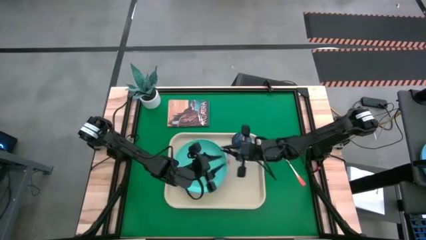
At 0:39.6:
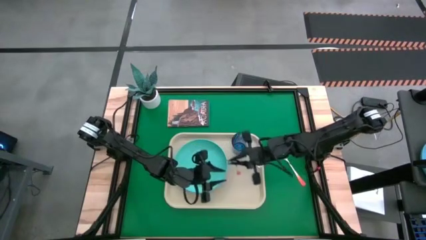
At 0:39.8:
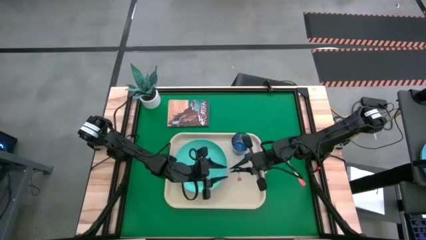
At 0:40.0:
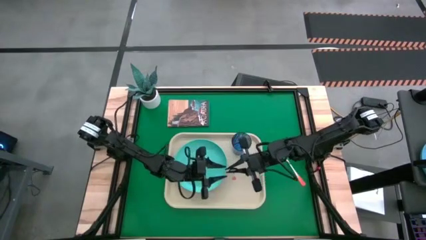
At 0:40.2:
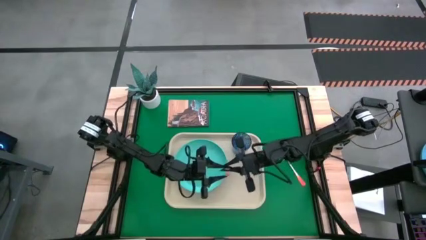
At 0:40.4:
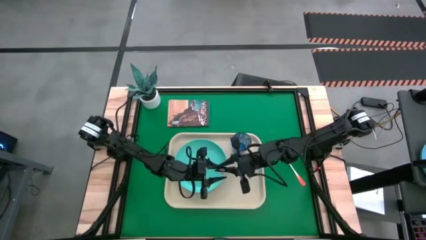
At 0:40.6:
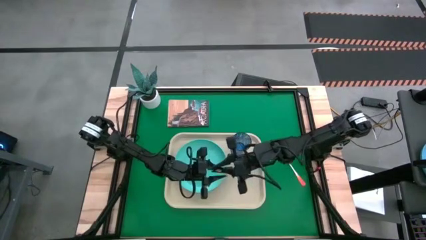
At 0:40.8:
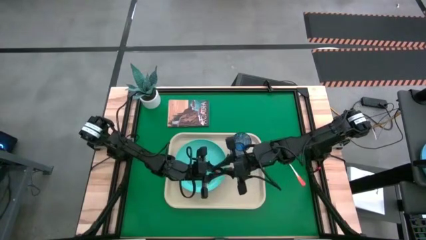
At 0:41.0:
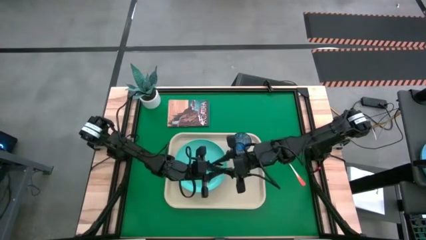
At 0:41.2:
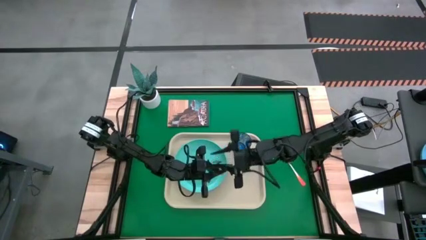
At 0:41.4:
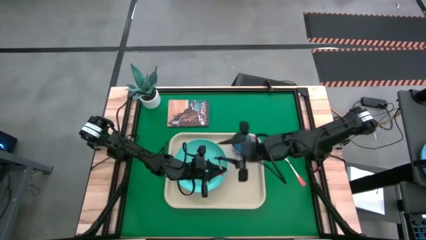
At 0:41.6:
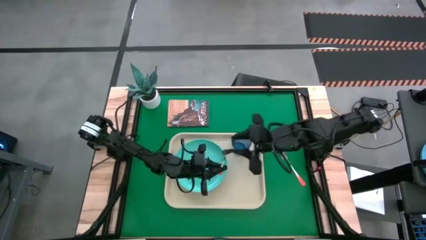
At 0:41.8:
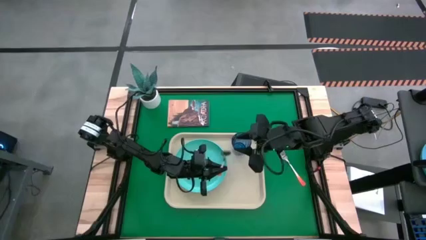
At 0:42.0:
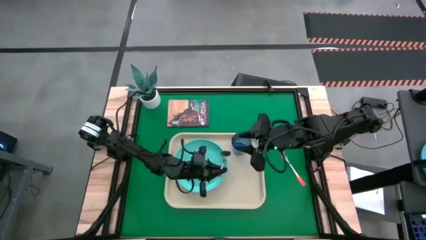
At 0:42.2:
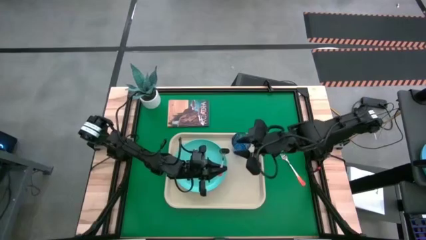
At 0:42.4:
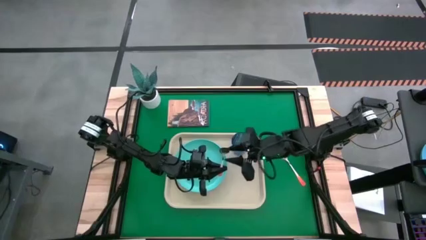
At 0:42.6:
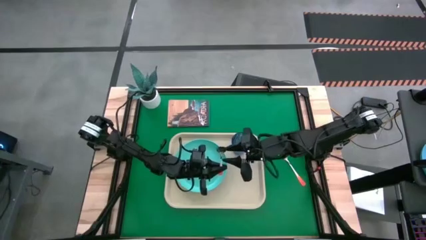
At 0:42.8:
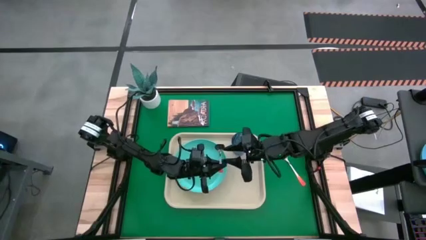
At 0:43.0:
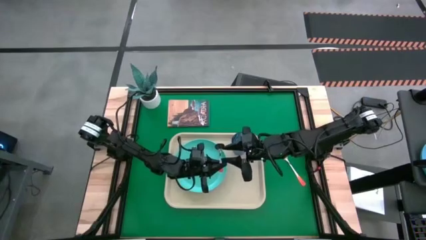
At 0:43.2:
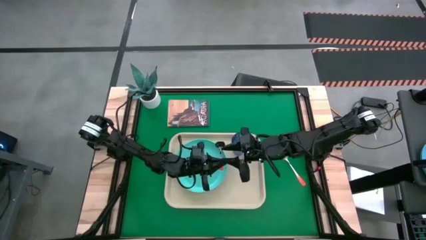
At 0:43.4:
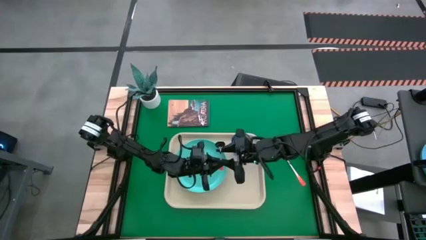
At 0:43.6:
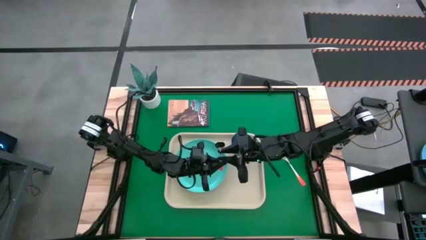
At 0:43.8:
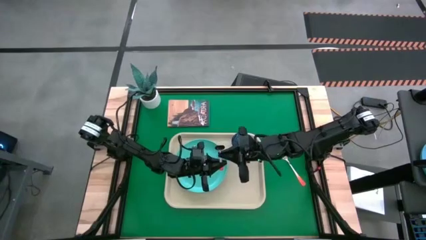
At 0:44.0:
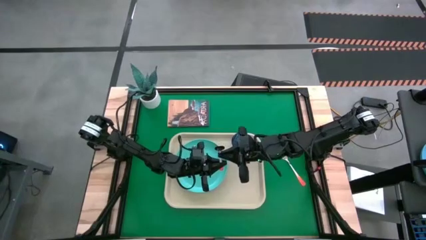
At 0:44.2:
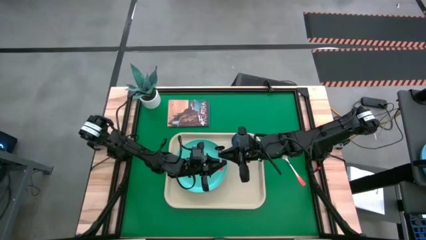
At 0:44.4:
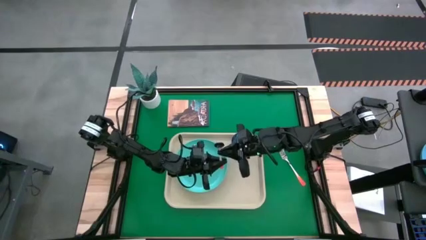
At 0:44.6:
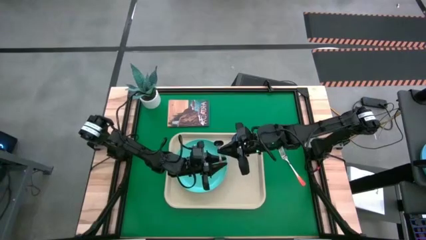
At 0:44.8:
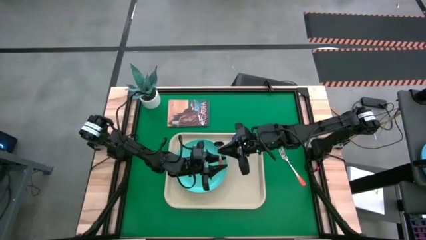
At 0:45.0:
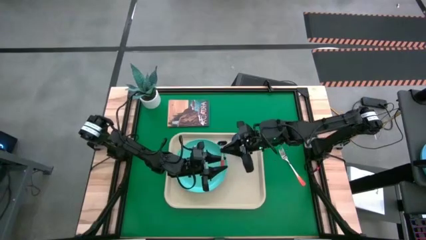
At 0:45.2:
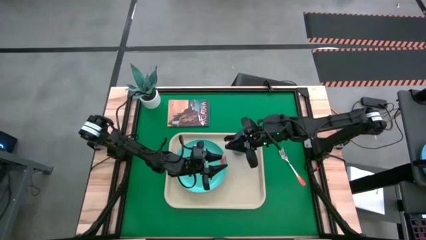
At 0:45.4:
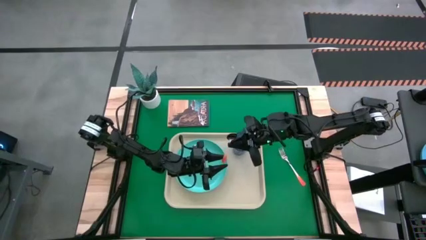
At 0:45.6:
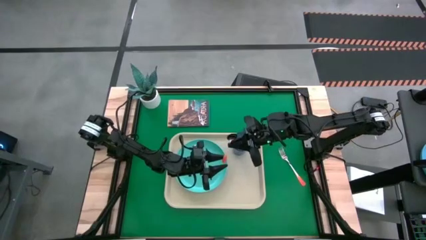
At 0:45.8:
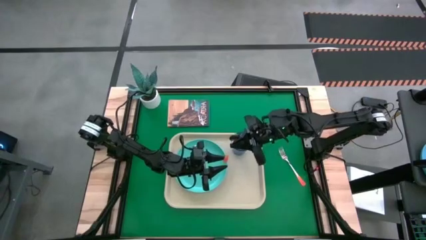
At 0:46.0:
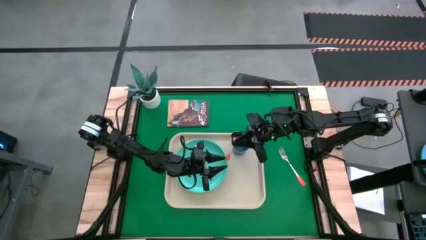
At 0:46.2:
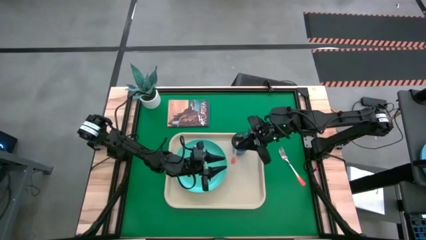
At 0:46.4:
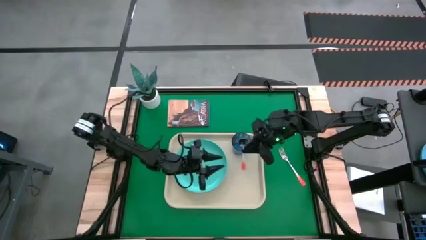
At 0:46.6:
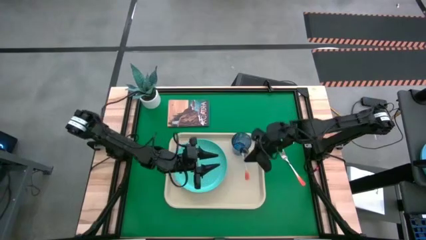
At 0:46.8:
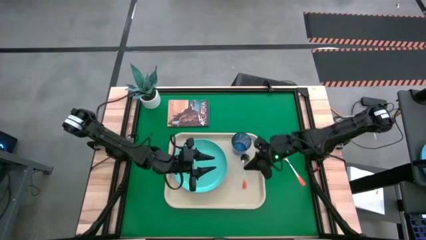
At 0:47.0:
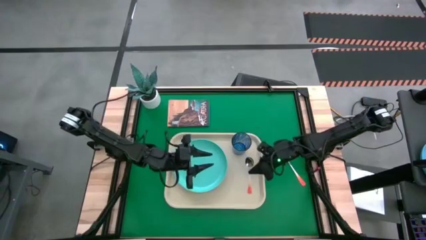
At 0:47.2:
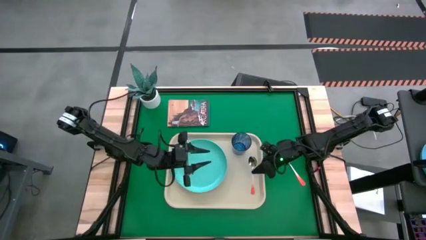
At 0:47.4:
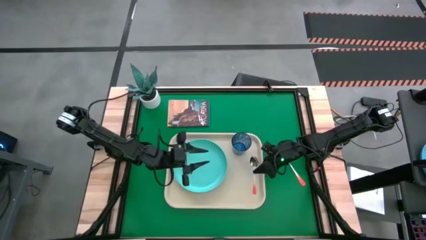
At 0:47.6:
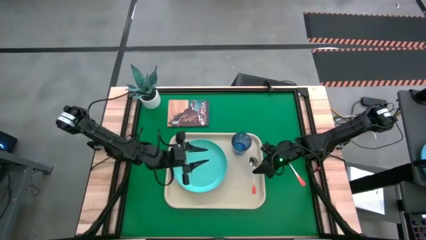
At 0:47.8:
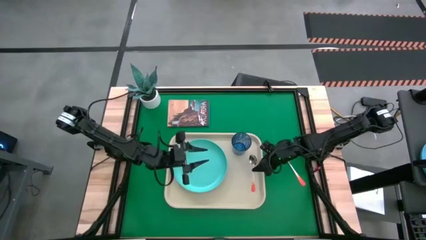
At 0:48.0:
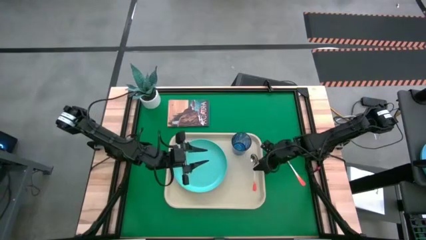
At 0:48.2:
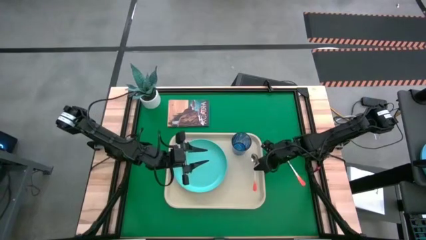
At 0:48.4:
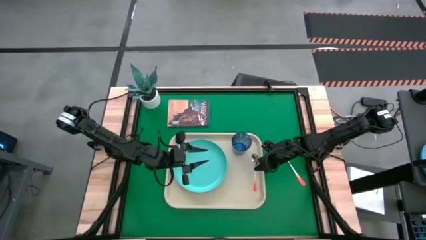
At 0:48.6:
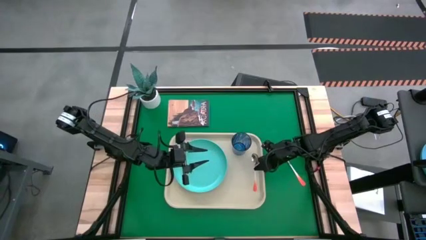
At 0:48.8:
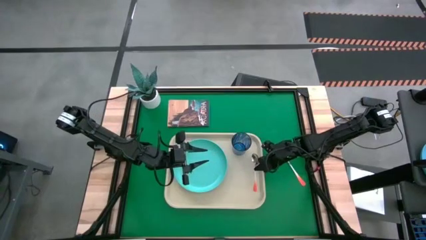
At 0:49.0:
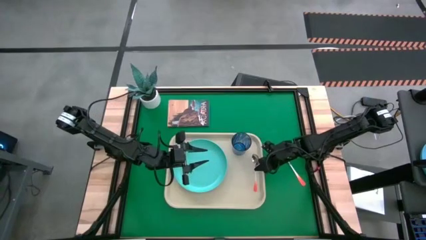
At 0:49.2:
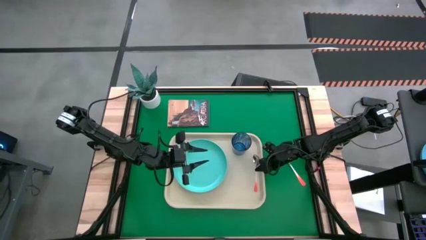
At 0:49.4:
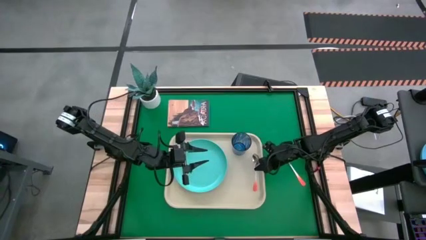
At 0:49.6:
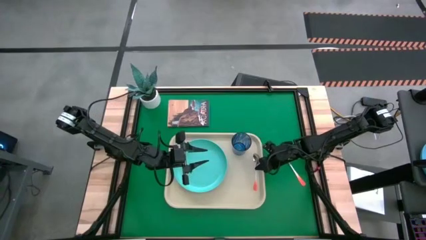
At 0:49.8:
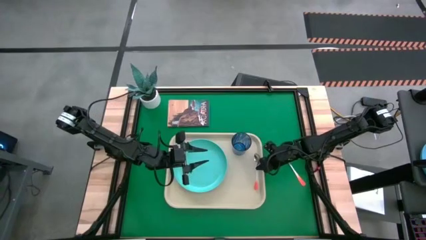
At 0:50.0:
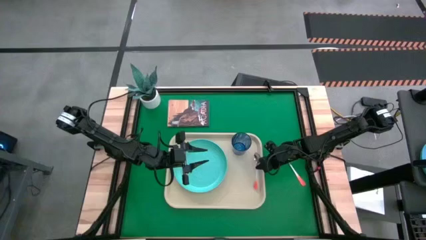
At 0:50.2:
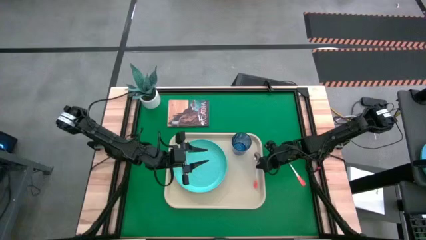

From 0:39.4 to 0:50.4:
Task: Pick and place plate/cup/fork/spoon on tray
Put the orange spoon in the right corner of the serving tray
